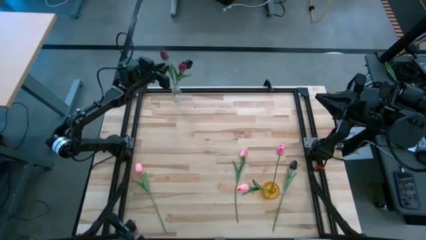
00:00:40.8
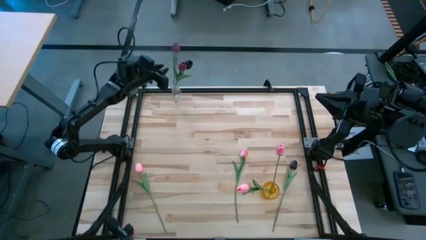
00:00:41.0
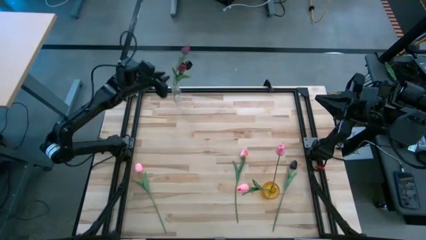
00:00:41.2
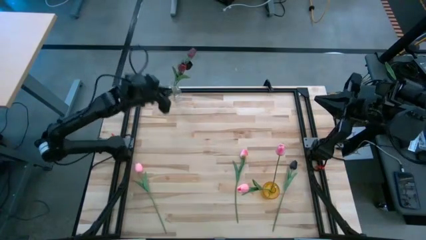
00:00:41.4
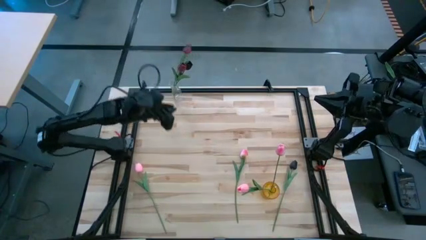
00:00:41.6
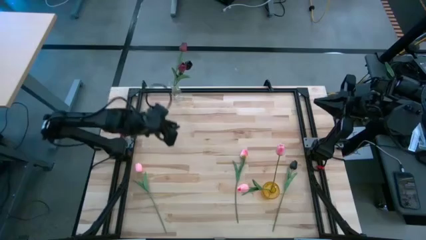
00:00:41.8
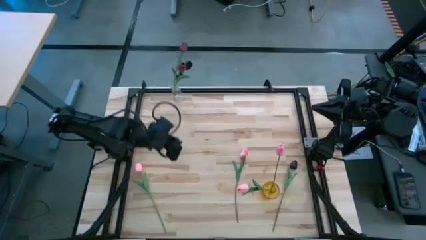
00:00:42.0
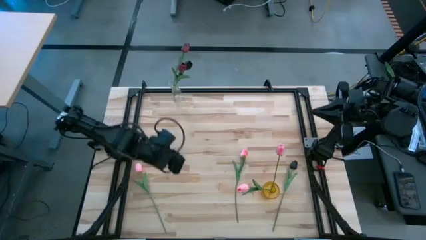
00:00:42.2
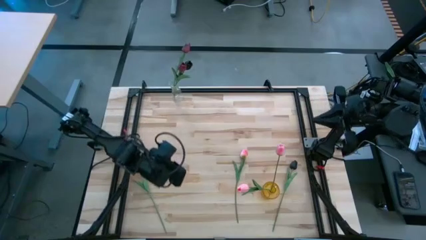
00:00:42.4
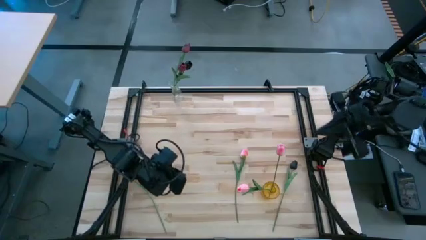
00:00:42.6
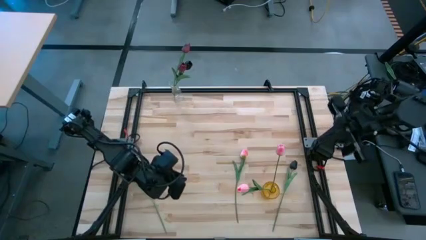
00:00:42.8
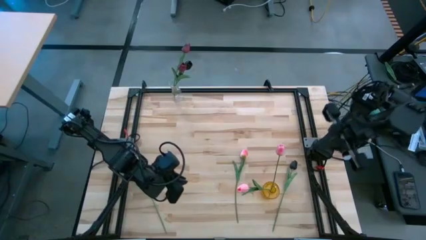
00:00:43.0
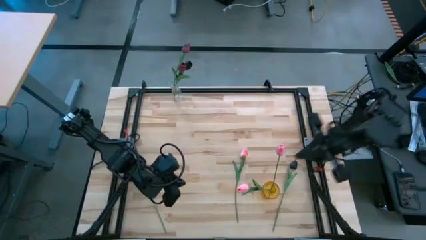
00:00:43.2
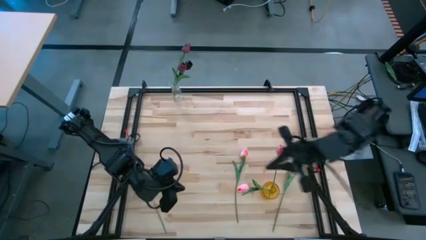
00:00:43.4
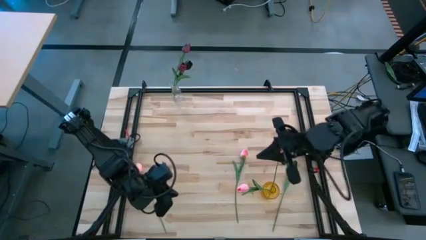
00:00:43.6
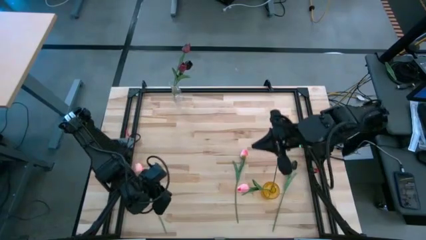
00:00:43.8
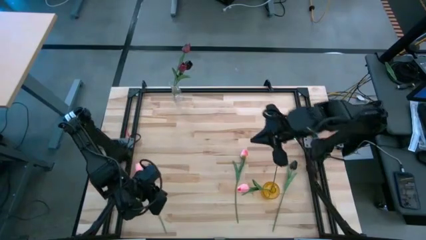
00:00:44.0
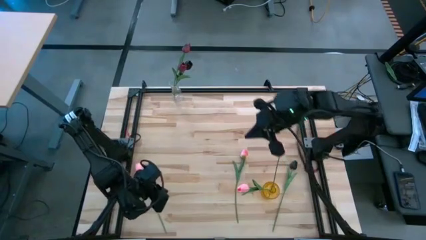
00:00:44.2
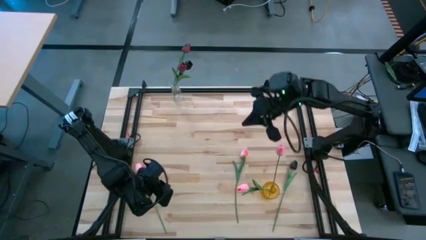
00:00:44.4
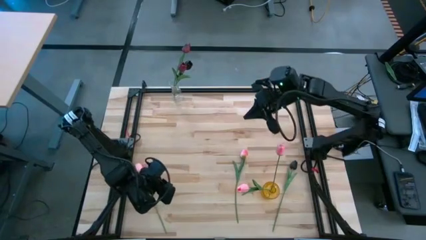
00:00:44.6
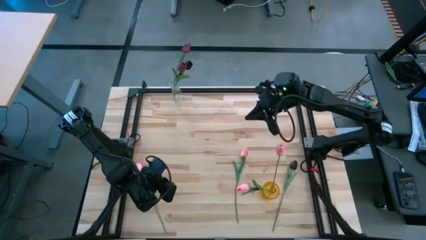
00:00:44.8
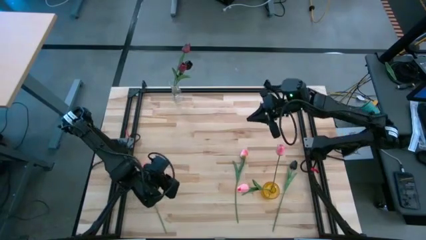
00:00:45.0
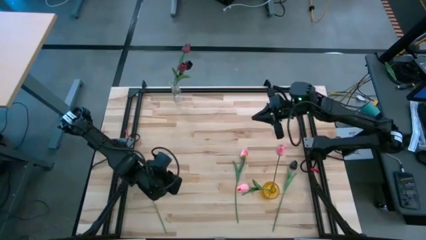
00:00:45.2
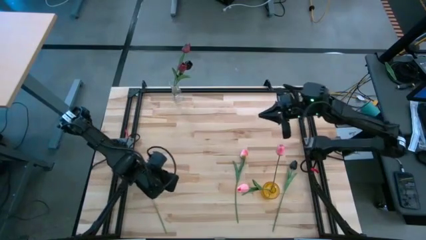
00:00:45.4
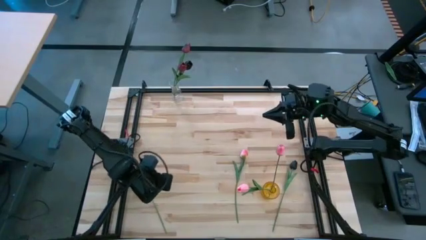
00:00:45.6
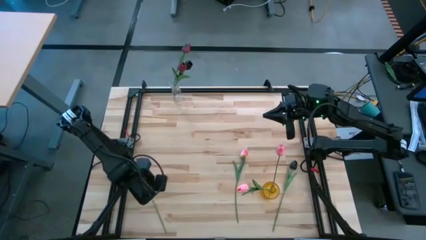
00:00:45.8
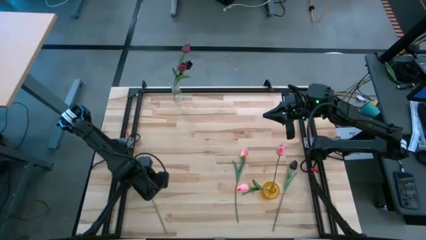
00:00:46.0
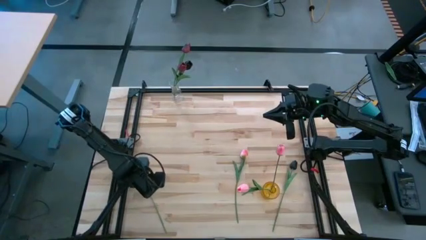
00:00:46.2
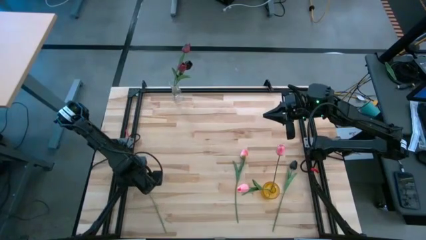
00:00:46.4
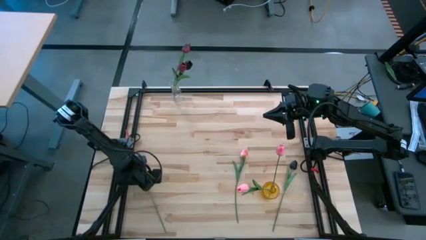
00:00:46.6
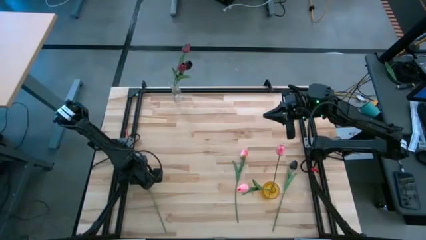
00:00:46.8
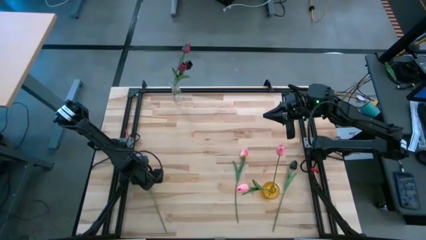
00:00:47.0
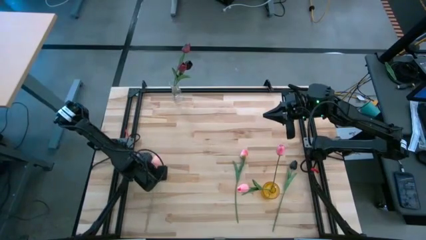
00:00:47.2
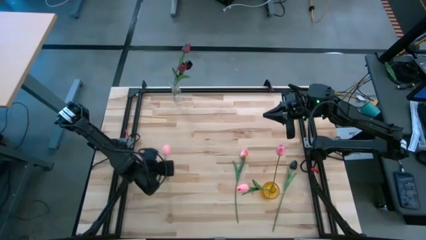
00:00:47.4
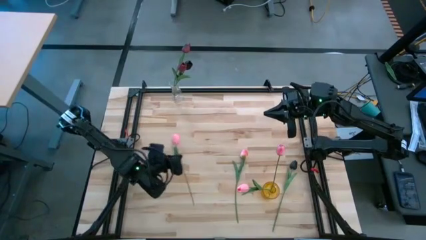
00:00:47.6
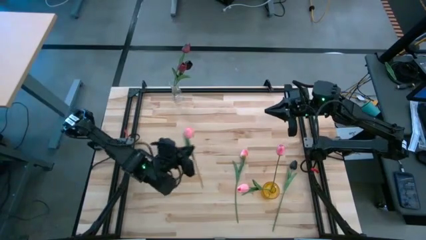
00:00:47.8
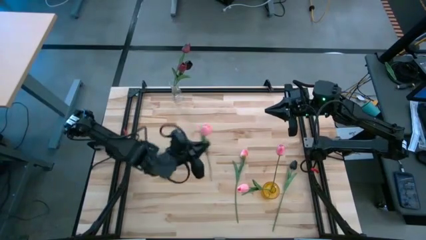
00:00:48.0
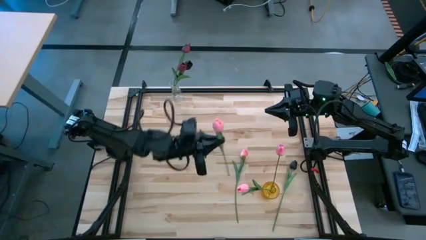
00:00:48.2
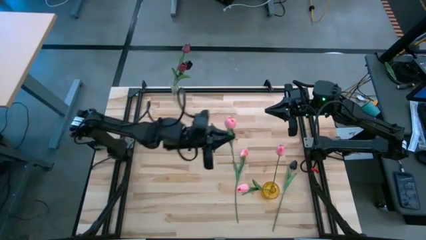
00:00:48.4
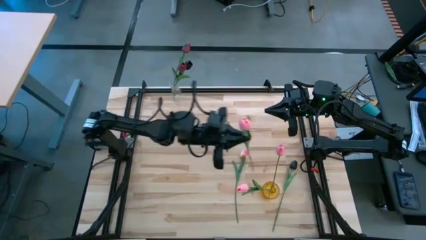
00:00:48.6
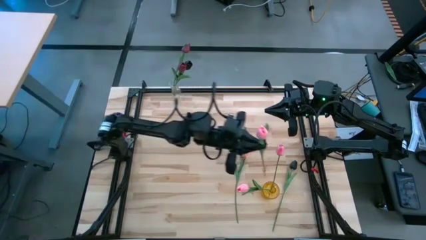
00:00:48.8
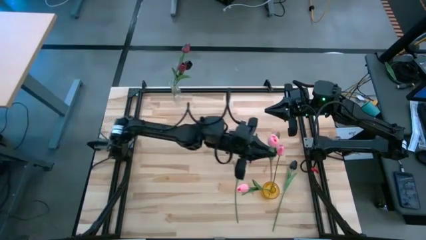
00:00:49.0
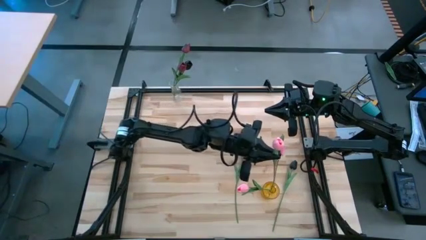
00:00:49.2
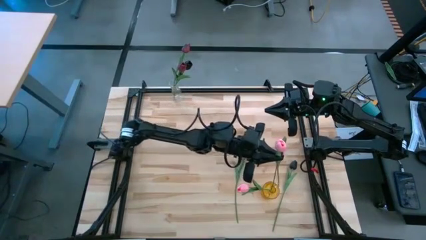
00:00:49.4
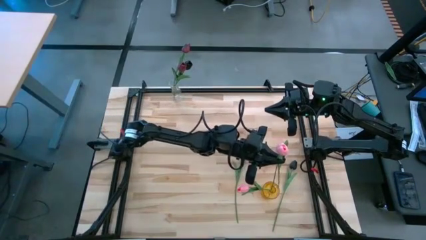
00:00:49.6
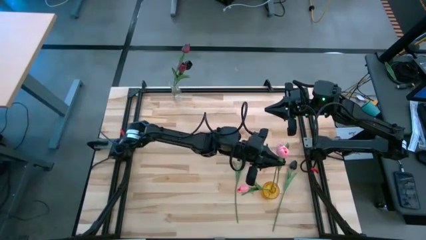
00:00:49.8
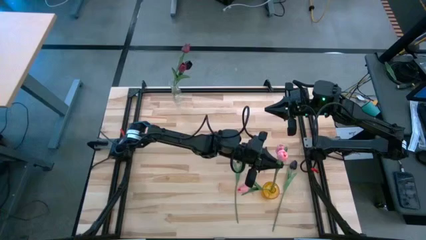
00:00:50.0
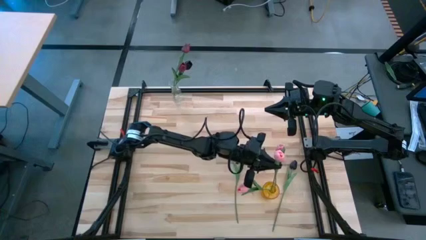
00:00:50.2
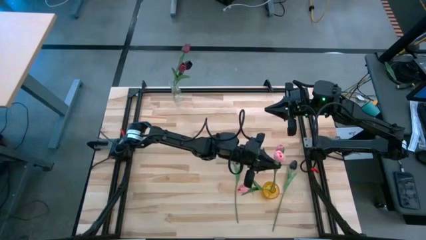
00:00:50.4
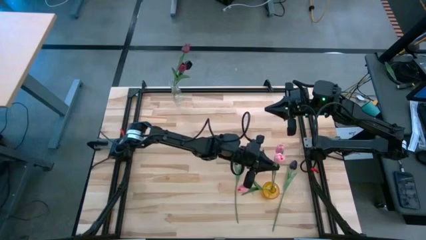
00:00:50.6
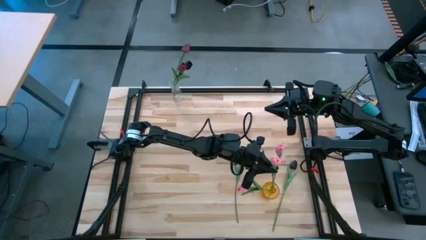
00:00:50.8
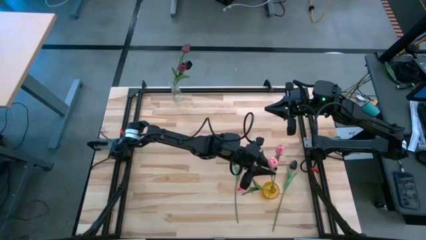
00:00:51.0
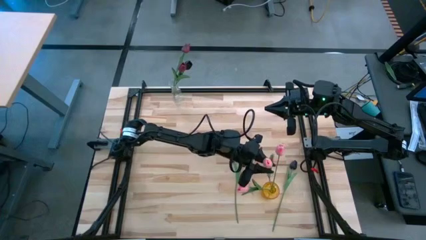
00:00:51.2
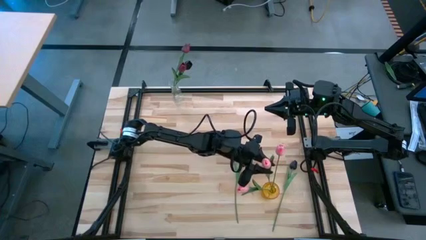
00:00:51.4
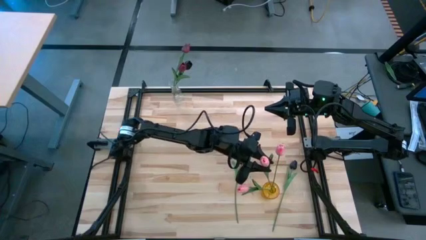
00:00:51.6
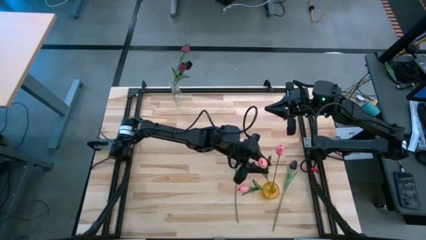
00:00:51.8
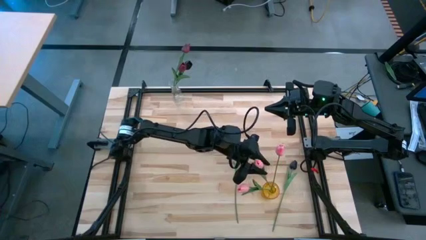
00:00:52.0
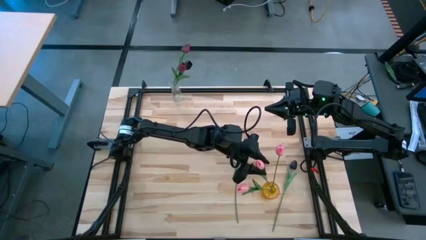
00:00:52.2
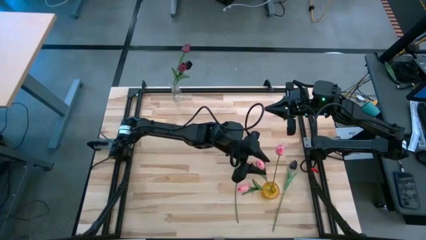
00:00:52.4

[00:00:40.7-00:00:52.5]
Task: Sort flowers into vase by color
Put the pink flower into the yellow flower vase

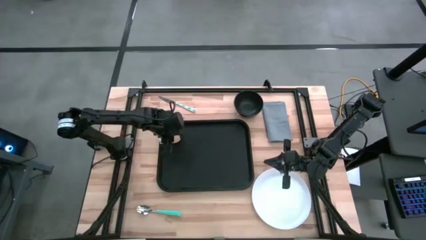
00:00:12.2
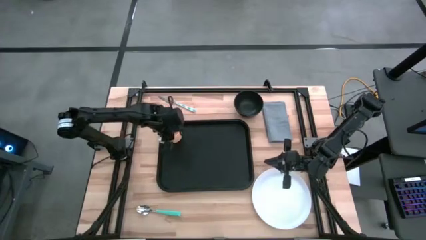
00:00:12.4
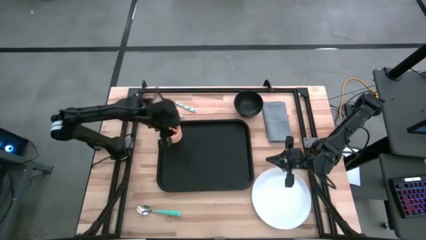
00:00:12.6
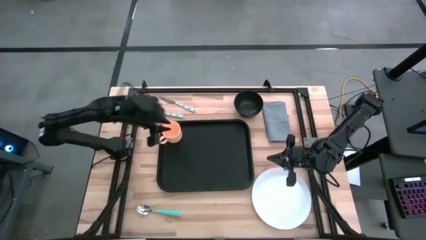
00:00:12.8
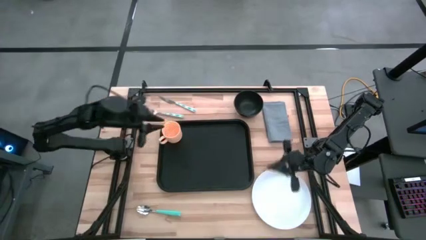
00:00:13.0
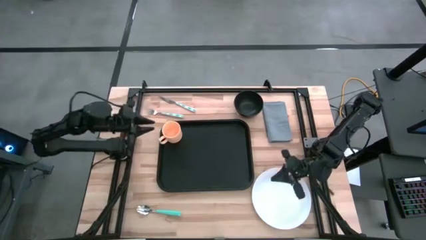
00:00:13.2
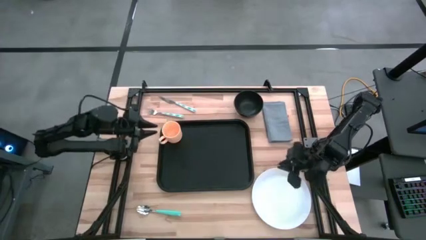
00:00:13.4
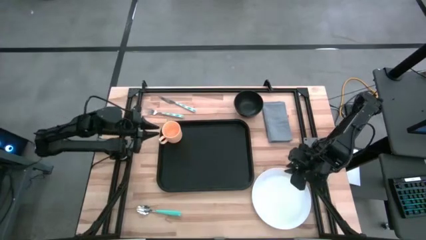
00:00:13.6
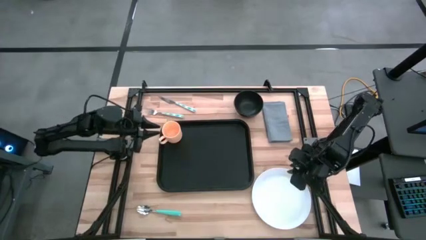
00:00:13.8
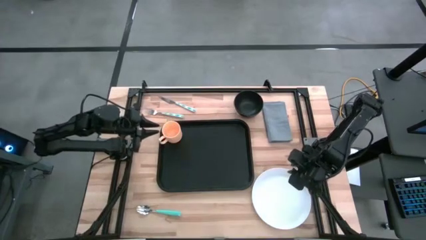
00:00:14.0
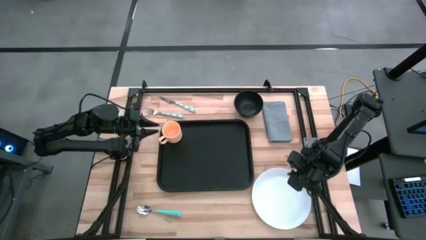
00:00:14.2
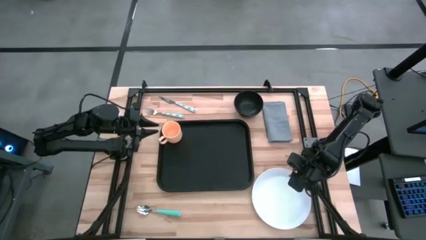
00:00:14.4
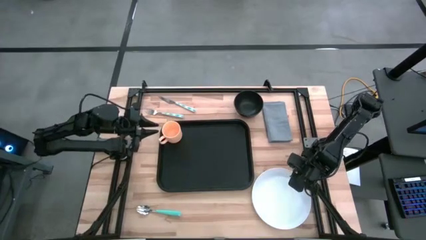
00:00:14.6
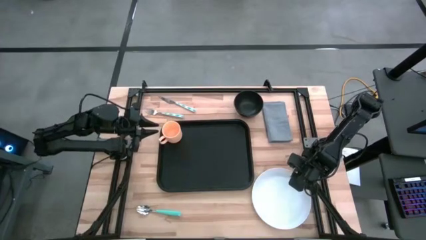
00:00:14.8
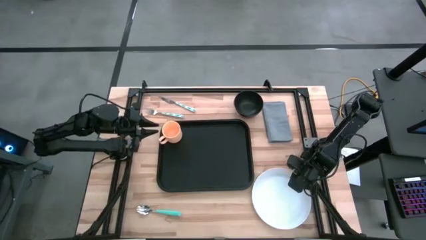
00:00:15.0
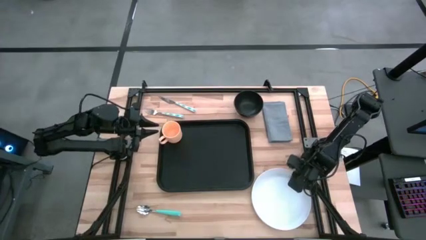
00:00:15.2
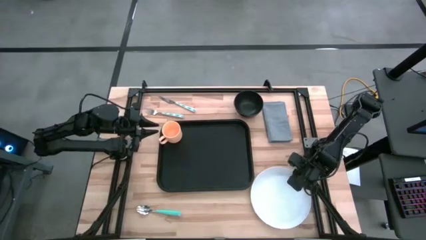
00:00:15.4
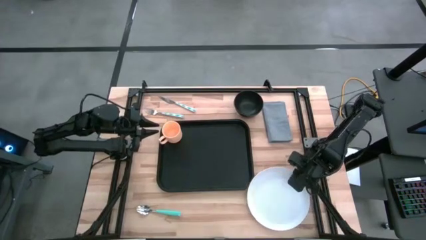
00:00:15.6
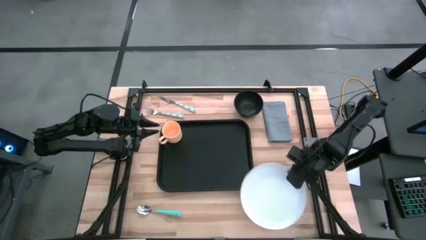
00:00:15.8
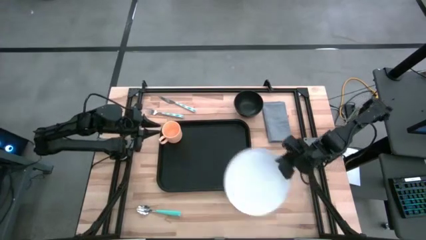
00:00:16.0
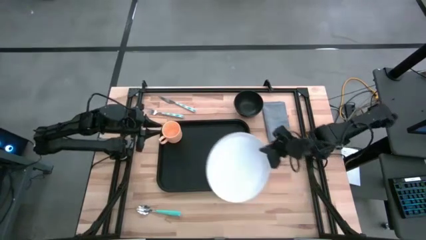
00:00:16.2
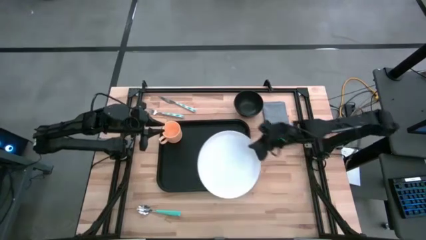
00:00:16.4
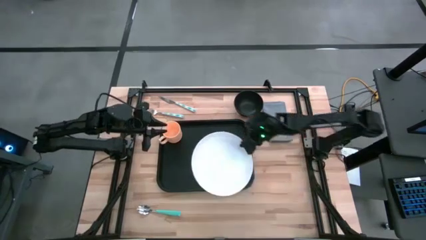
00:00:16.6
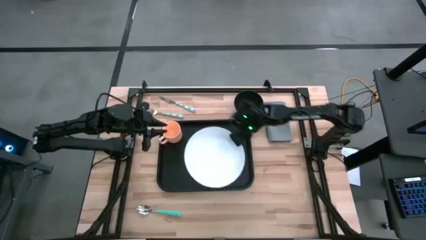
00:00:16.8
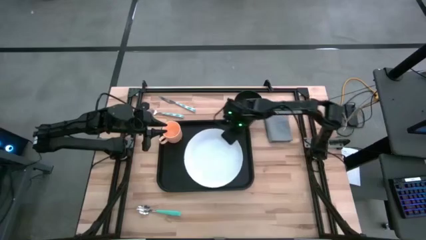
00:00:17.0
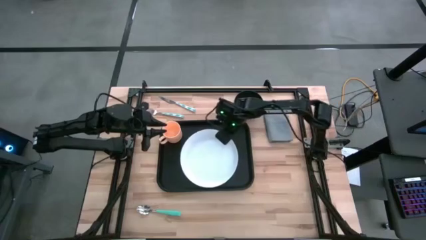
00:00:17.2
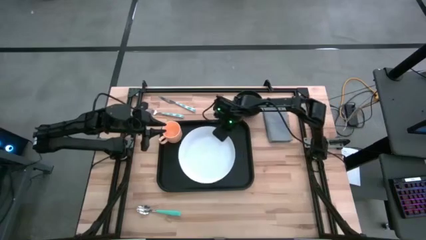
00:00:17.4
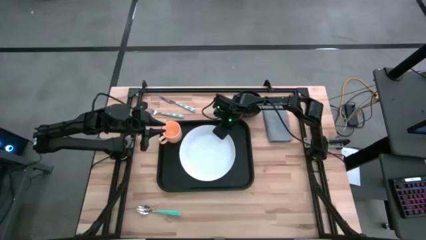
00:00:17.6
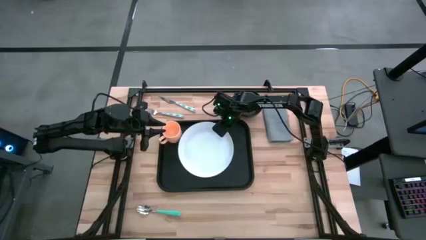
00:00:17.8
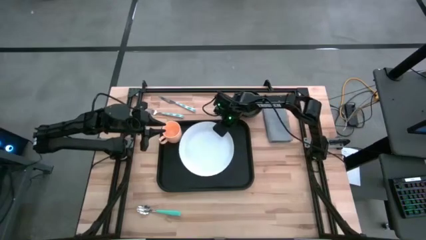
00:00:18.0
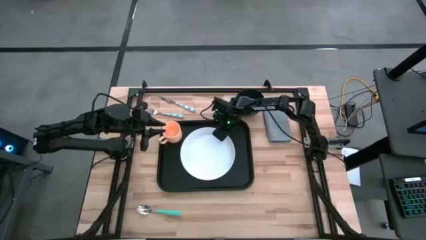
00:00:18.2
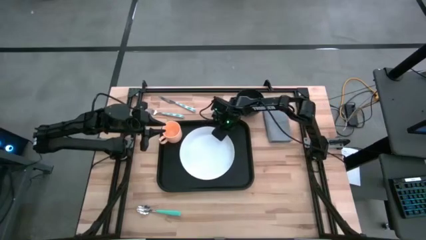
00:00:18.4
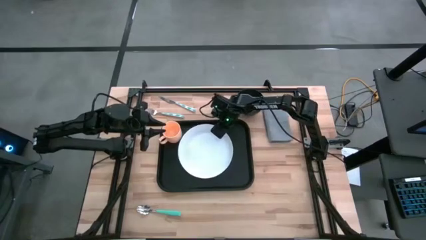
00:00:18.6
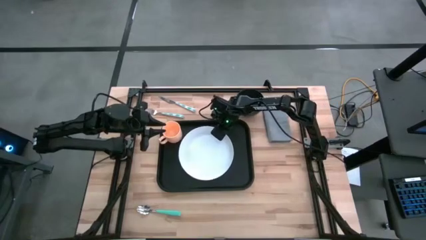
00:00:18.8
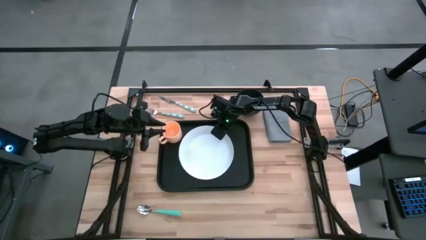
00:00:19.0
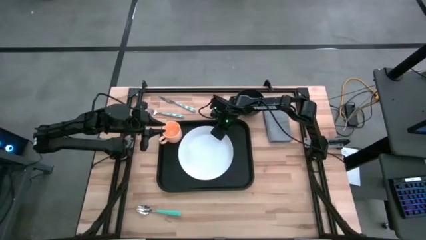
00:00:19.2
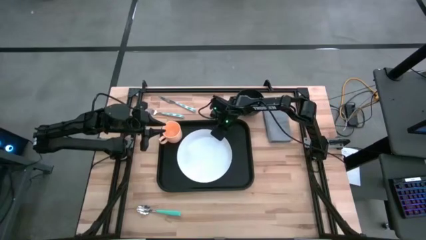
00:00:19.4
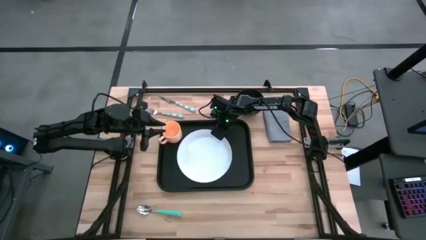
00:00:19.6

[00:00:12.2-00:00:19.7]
Task: Set up tray
Put the white plate on the black serving tray
